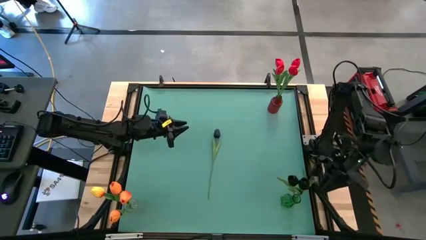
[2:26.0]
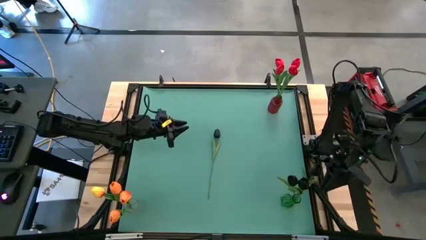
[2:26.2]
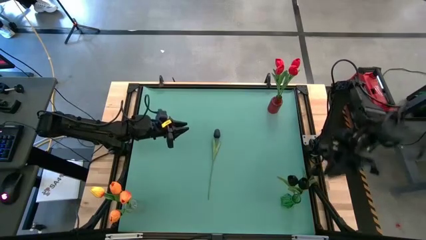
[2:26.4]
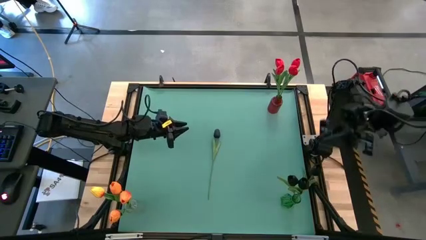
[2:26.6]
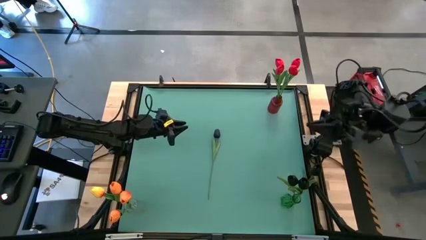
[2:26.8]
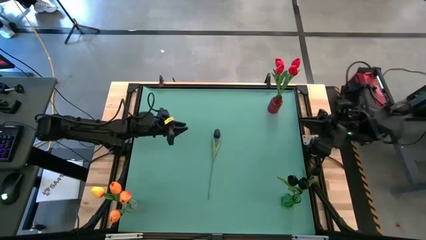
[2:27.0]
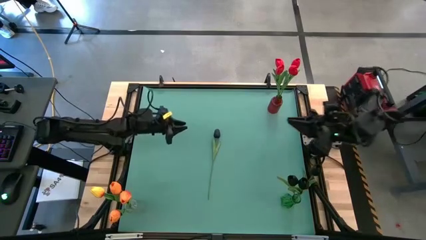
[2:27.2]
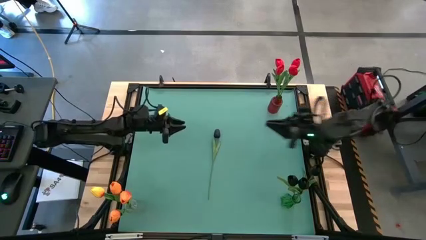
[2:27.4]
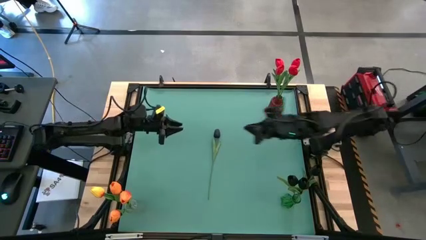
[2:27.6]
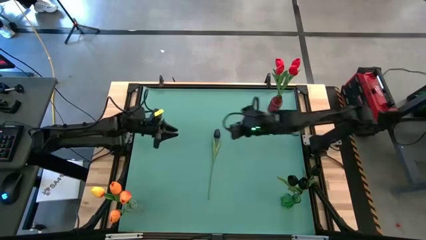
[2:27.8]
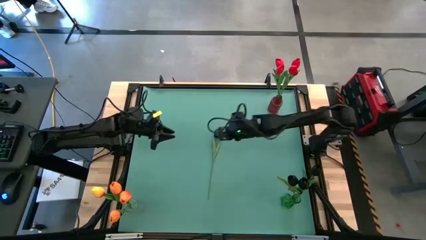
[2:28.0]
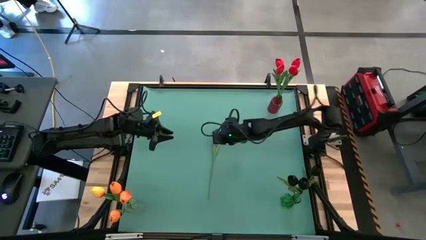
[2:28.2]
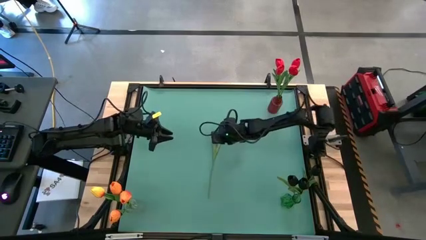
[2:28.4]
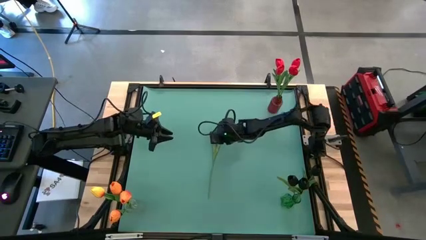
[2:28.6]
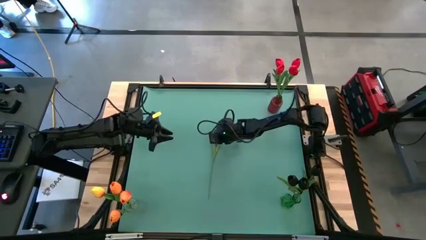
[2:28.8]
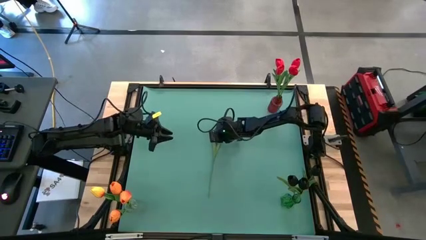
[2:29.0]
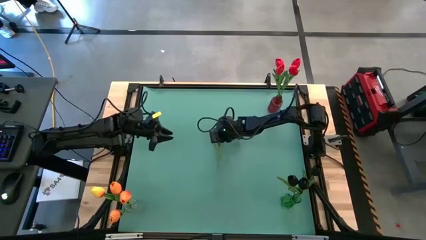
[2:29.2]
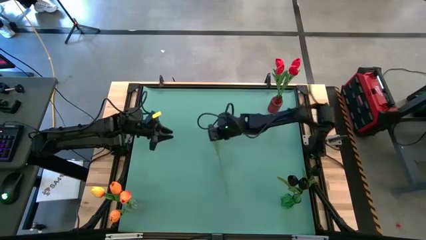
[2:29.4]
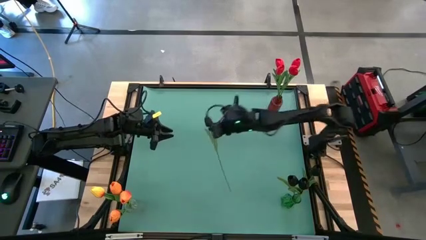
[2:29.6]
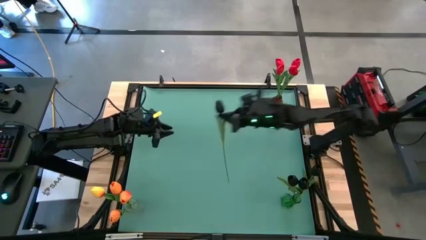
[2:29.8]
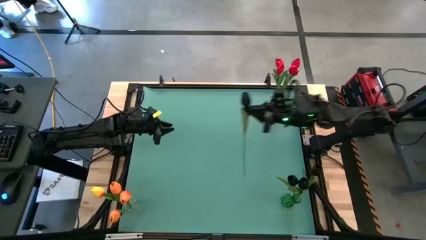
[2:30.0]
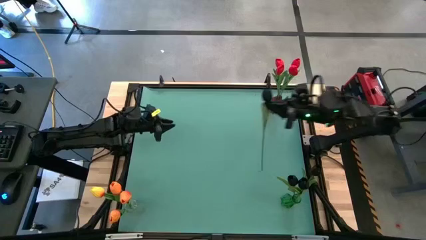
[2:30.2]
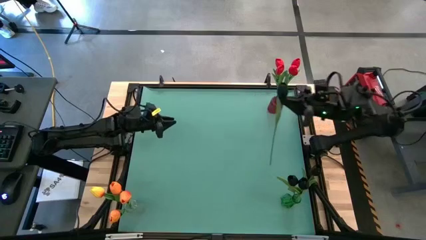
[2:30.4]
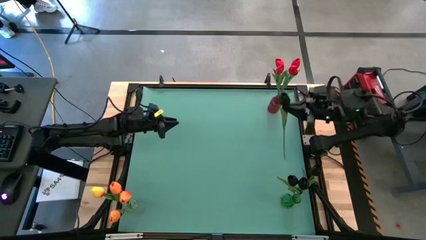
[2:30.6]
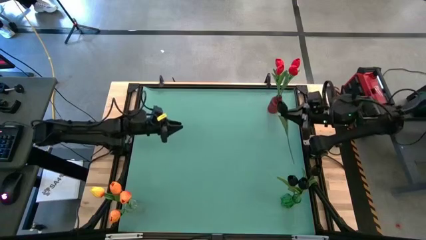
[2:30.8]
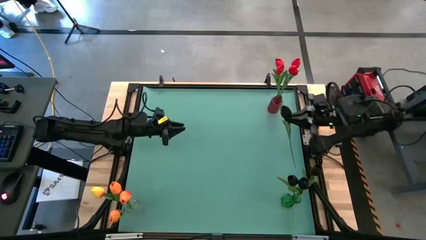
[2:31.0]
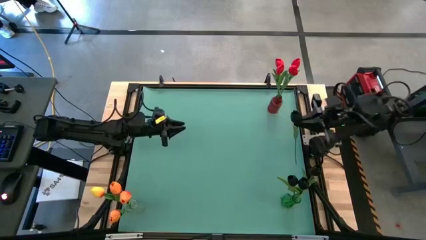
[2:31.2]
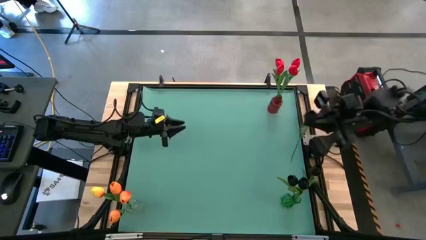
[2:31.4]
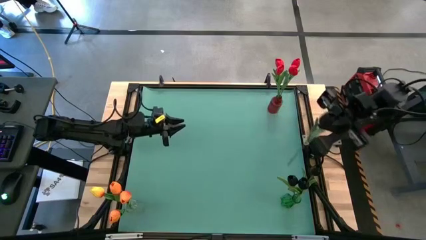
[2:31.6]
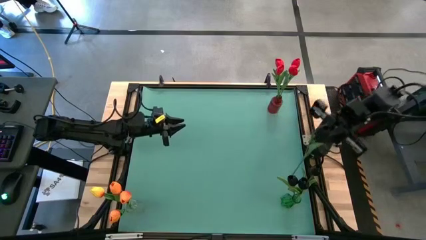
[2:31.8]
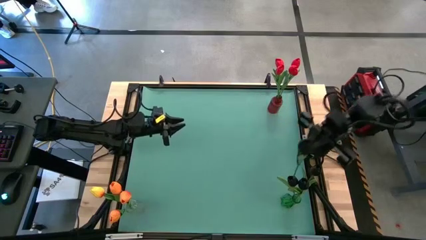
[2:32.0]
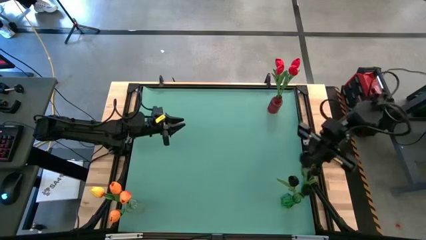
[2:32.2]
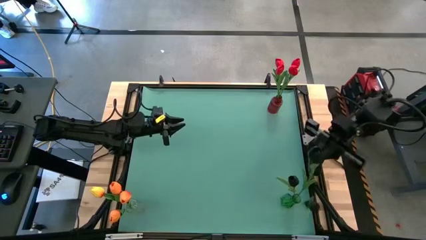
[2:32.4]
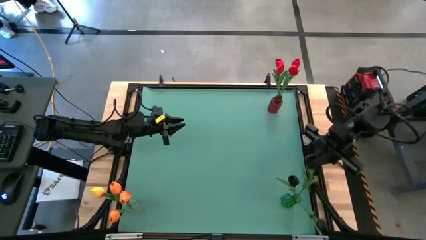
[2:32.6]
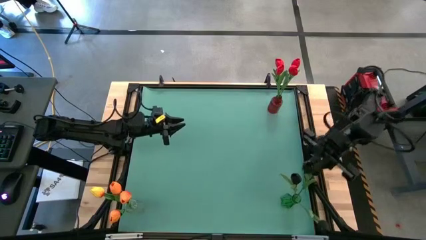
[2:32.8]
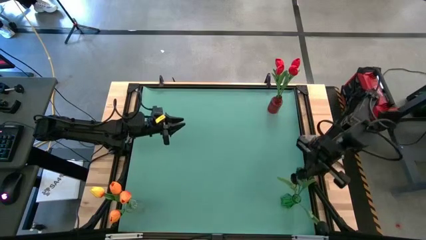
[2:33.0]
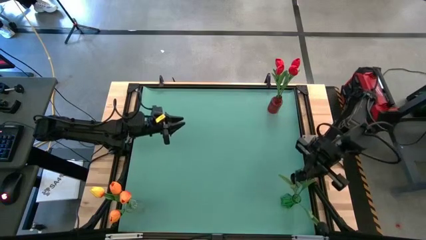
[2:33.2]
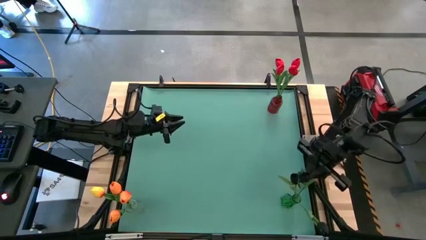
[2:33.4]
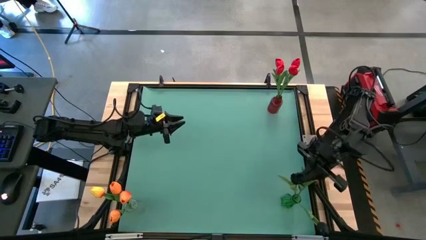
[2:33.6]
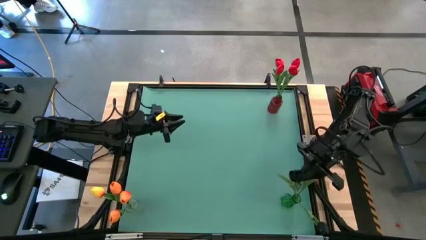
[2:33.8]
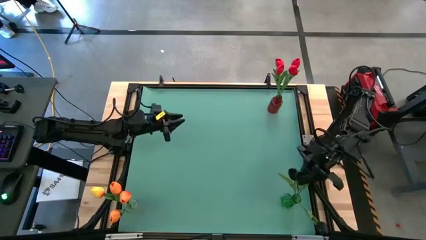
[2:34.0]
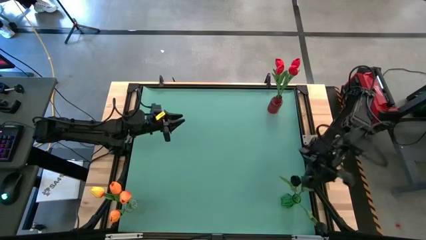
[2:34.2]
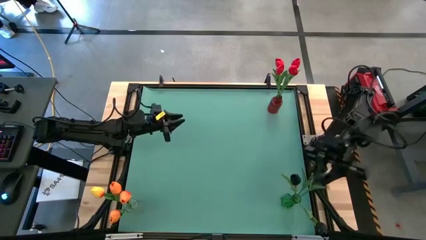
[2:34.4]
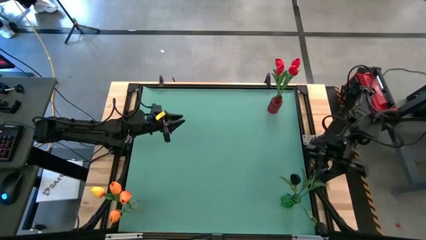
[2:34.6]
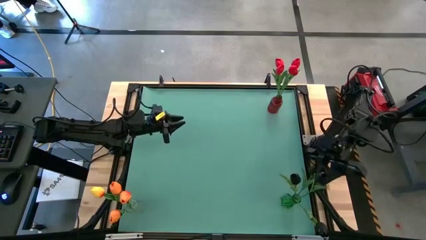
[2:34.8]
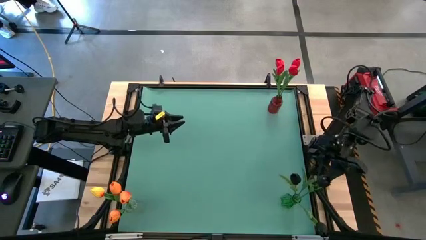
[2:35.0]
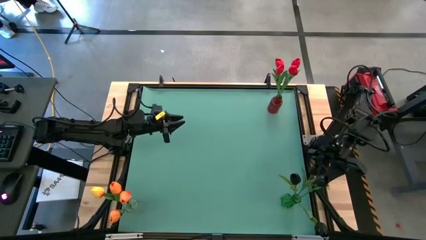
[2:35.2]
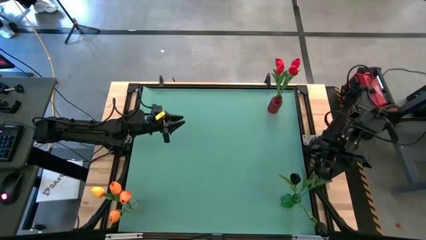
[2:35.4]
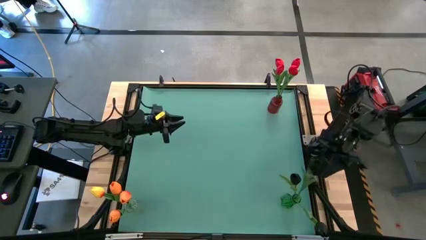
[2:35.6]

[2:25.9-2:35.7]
Task: Sort flowers into vase by color
Put the black tulip into the green vase

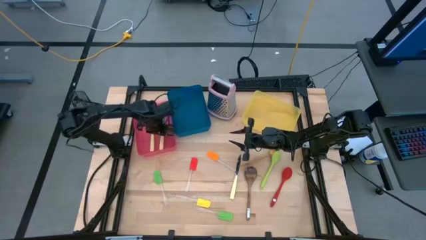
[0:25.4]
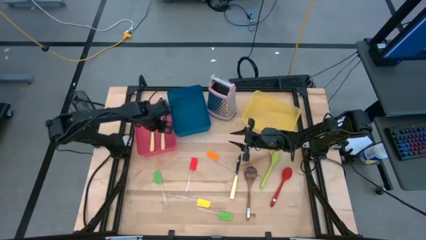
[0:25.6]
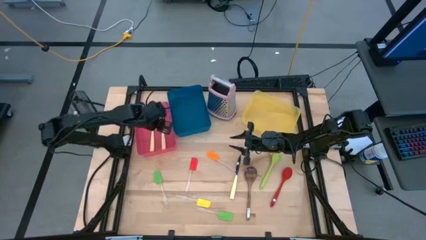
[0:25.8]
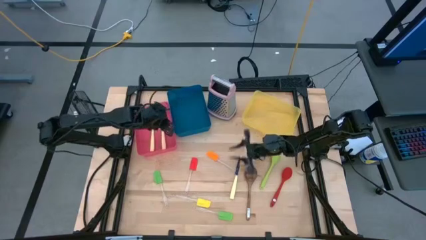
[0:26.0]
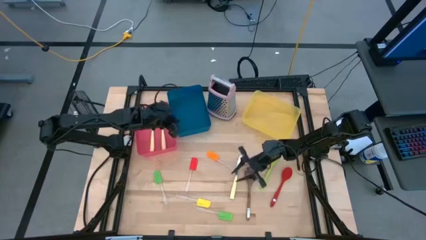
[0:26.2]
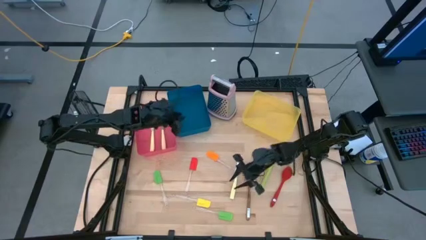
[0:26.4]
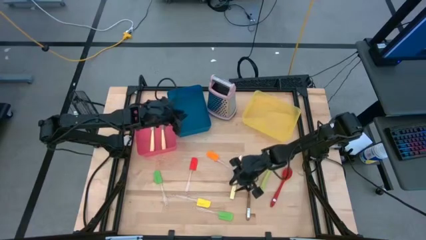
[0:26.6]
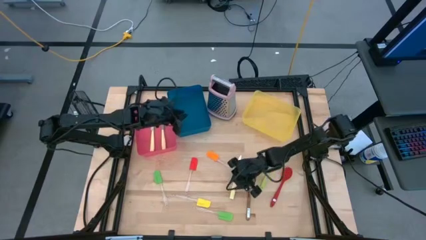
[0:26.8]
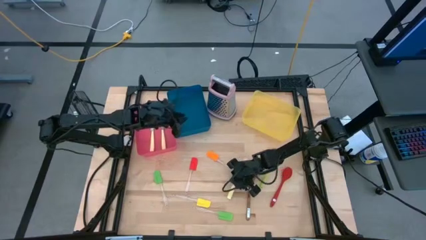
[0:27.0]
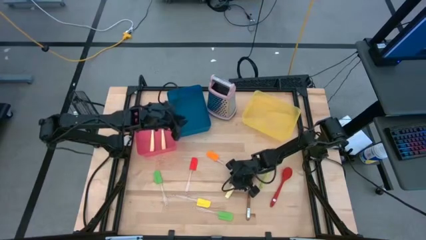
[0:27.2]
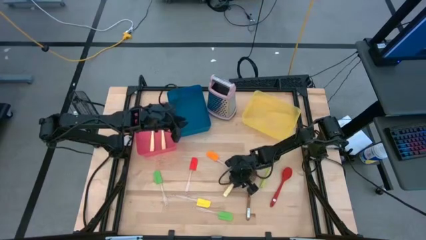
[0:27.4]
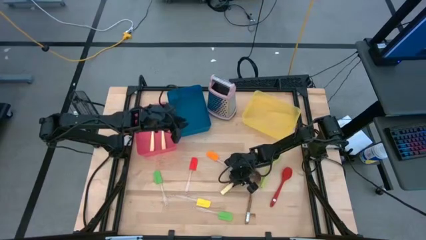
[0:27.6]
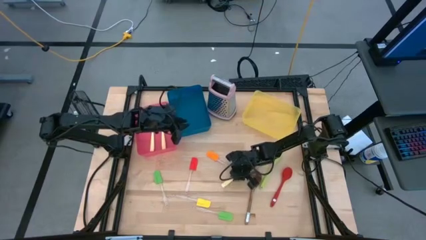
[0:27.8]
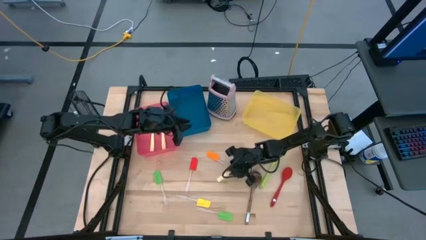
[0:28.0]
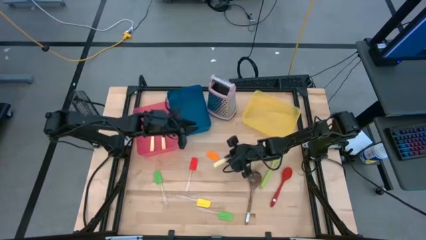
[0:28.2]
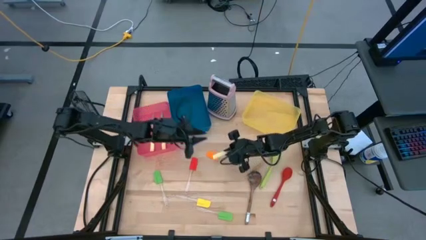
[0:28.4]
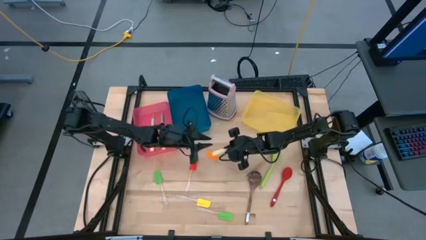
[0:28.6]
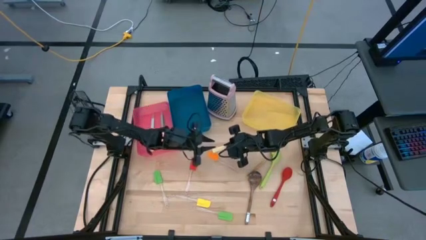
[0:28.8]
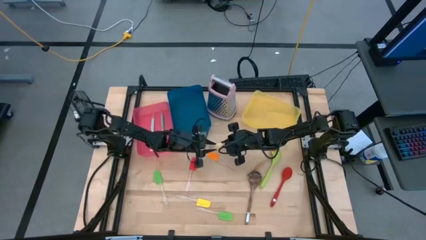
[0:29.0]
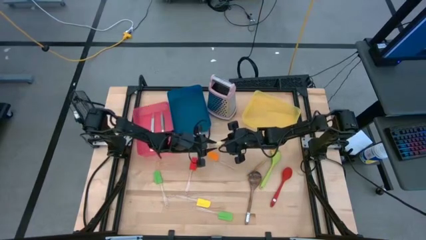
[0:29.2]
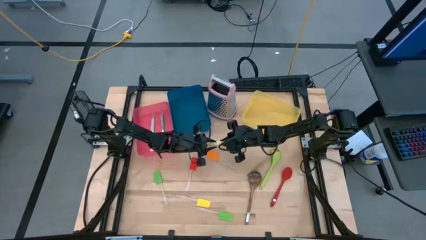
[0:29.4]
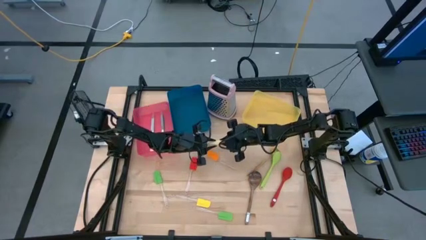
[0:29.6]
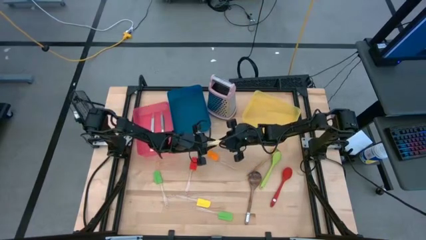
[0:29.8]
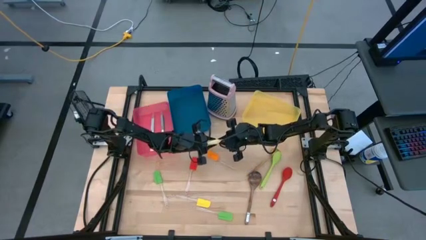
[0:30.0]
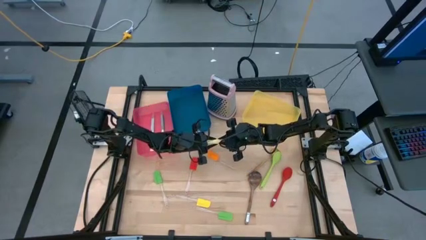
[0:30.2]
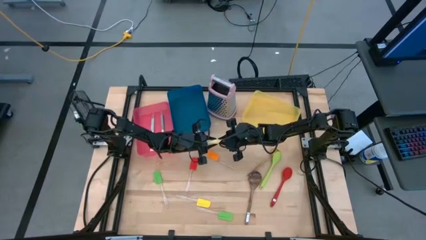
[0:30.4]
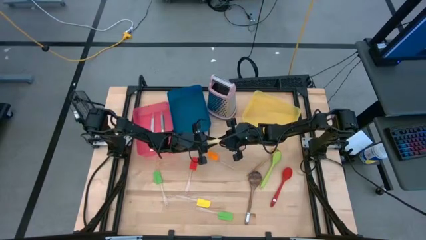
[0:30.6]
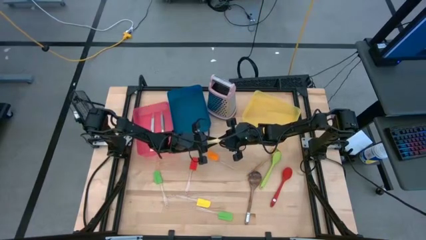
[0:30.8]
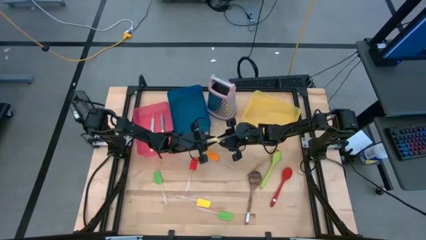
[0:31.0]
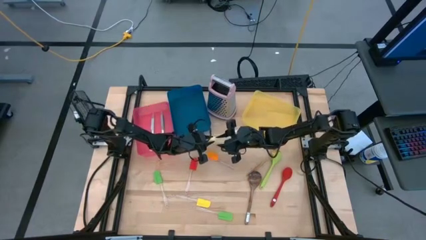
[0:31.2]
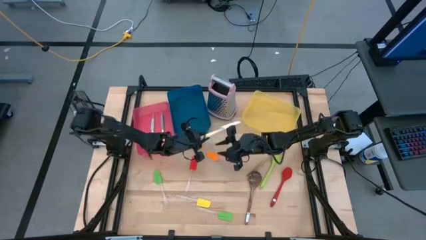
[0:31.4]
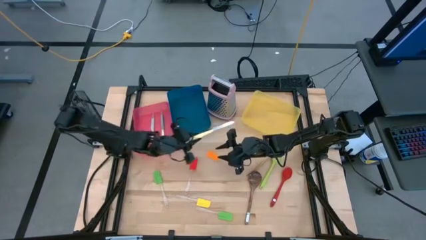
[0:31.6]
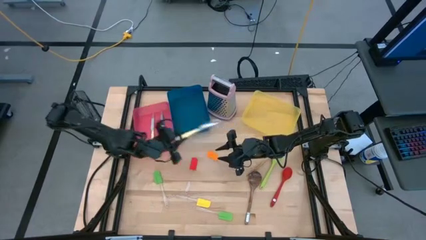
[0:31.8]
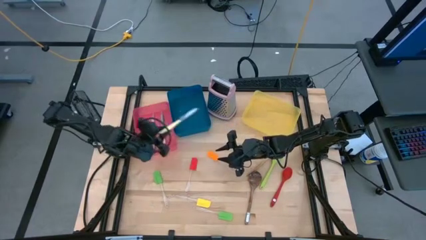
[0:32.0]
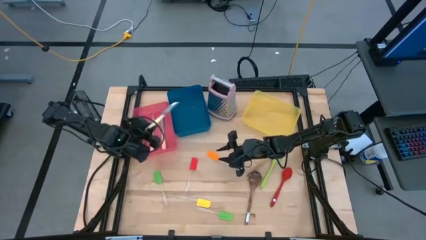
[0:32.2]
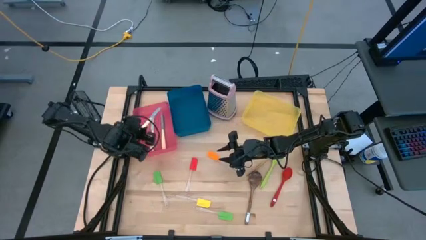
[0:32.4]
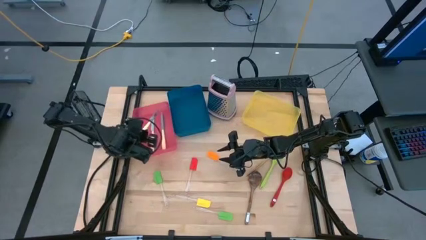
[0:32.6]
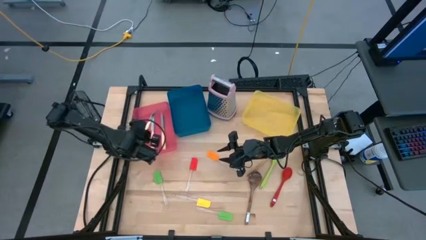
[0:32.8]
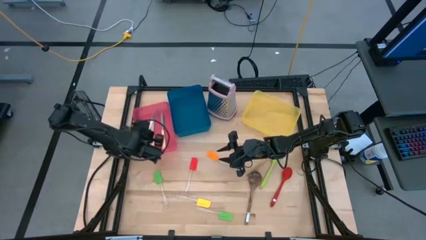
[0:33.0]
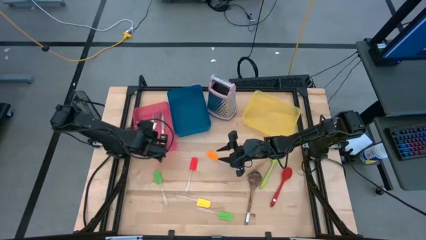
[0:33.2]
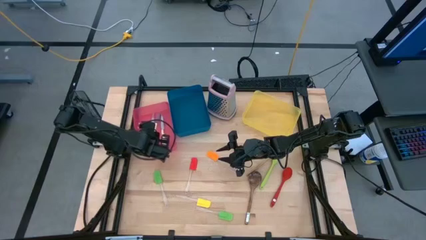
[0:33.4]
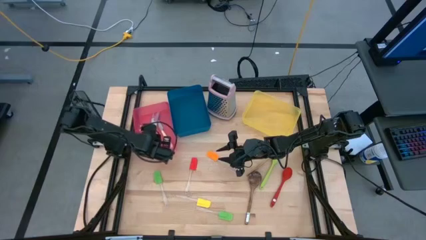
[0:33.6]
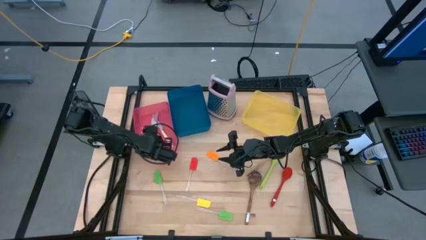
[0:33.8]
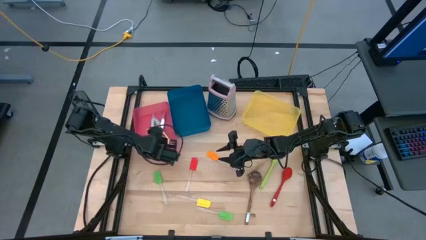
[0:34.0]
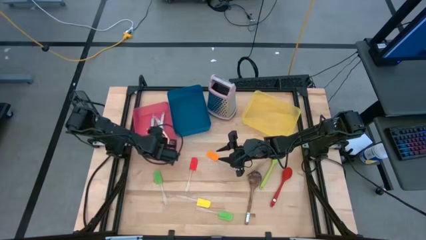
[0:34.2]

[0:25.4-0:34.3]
Task: Pick & Place Kitchen Items
Put the yellow knife into the pink bin
